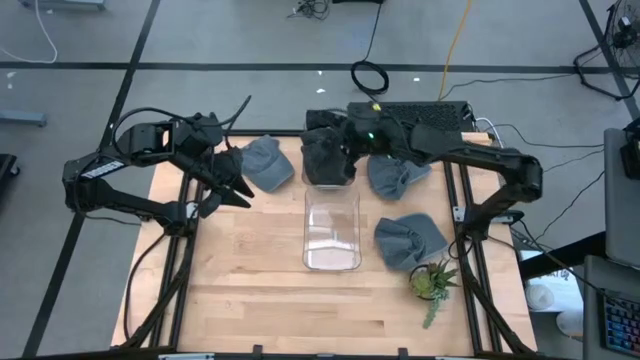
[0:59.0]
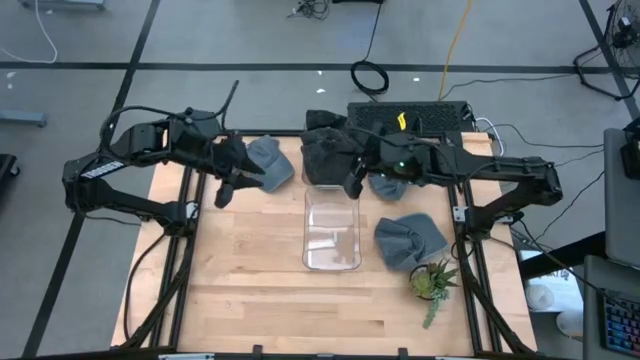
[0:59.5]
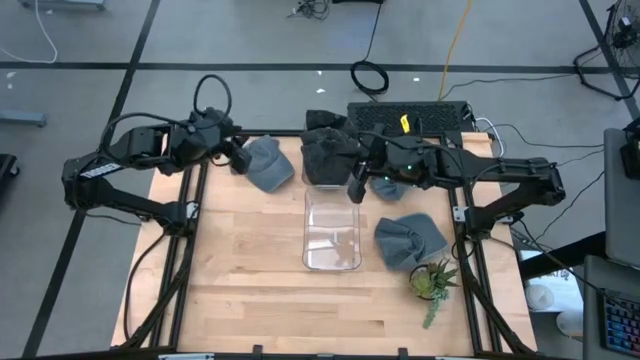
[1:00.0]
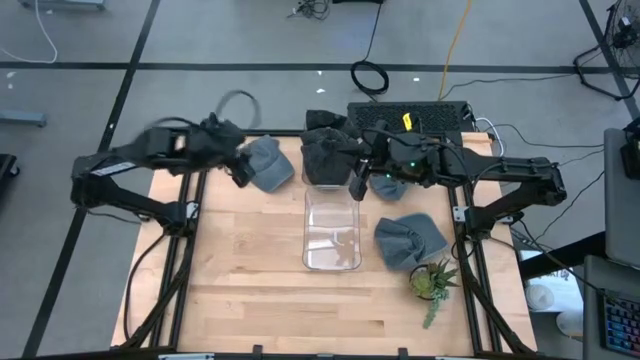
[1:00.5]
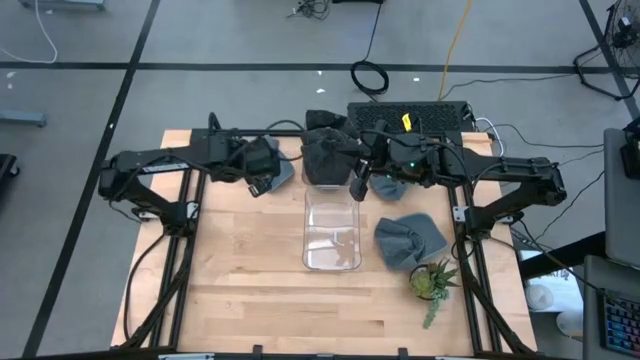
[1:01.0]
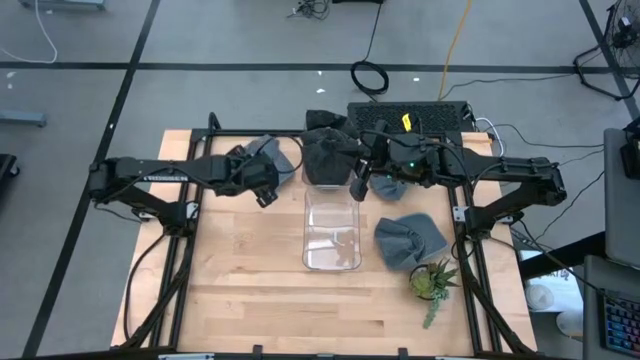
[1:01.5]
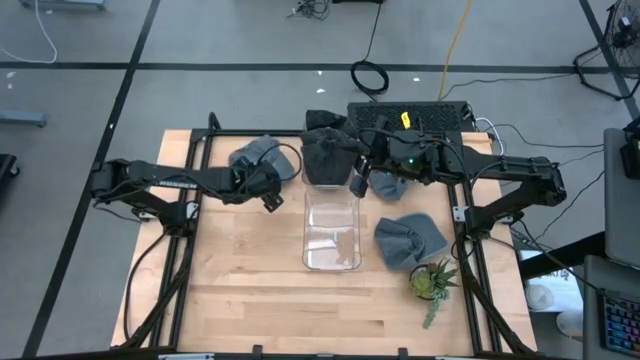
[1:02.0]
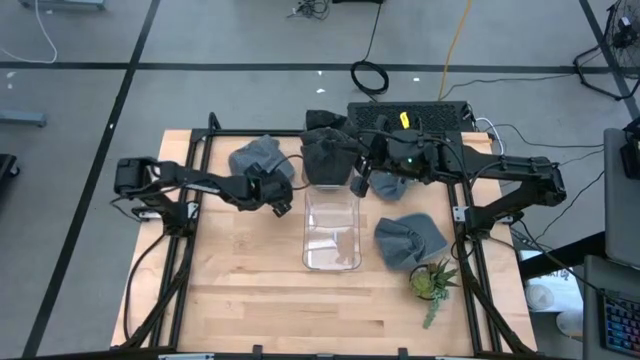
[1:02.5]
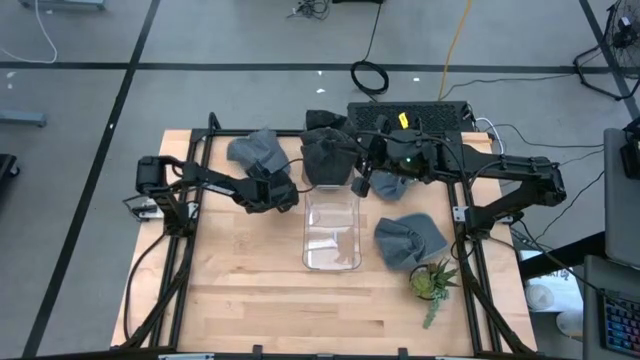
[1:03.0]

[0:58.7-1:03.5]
Task: Pick & Place hat
Put the top left blue cap into the bottom transparent bin

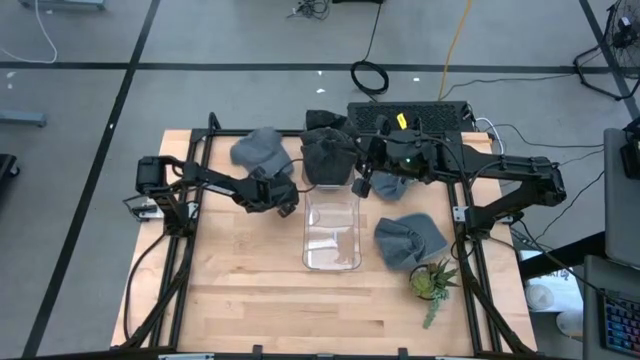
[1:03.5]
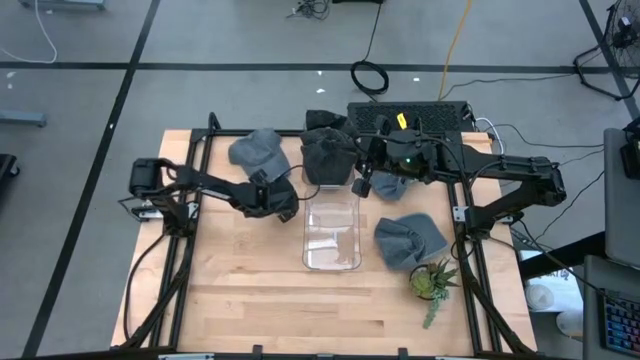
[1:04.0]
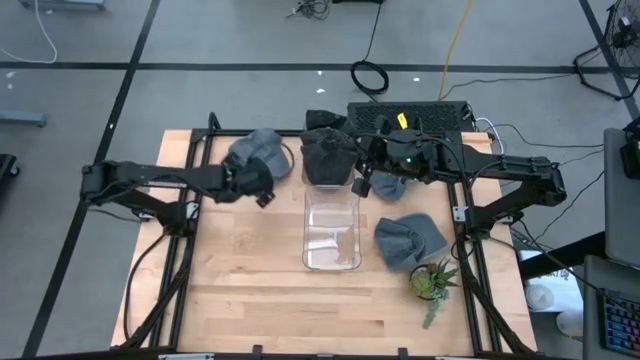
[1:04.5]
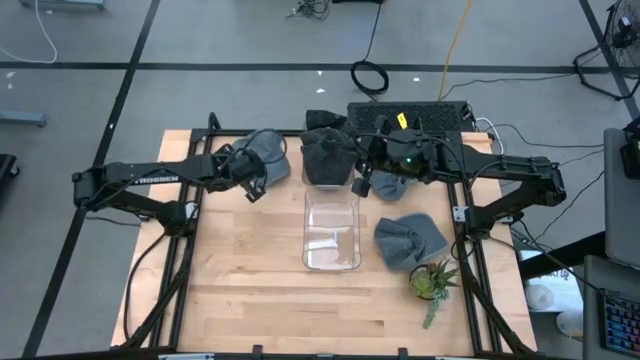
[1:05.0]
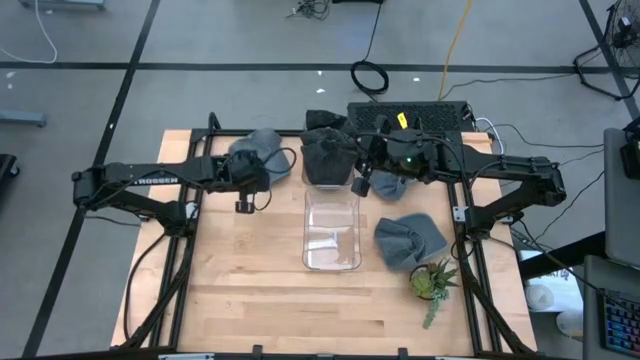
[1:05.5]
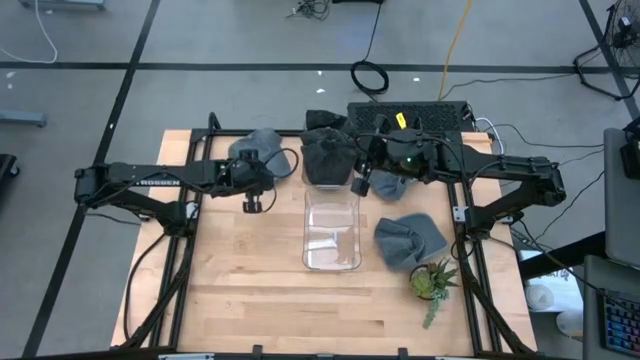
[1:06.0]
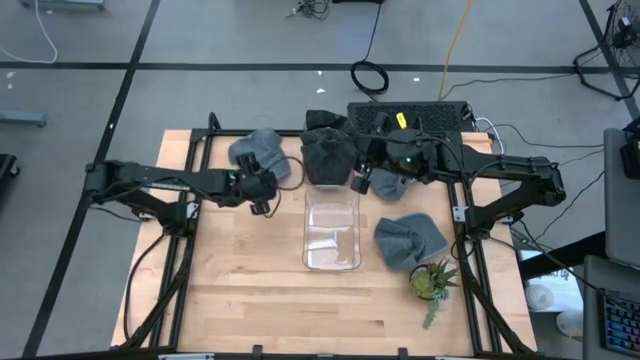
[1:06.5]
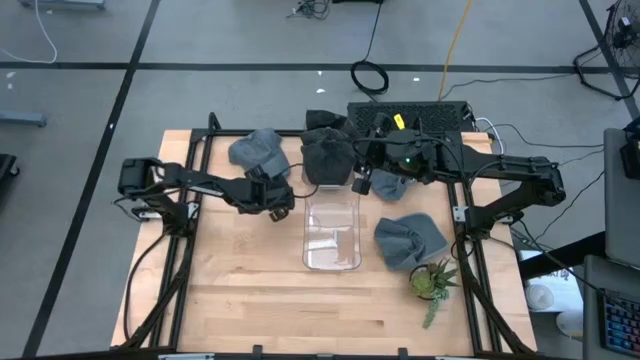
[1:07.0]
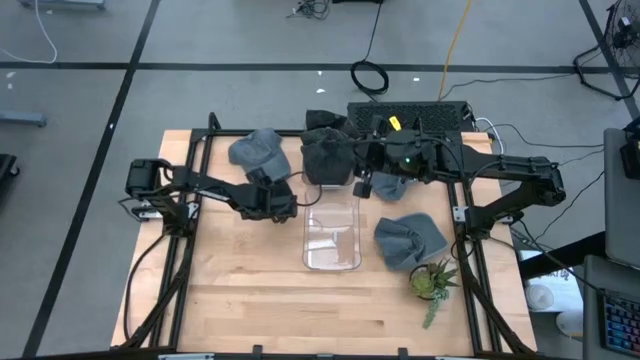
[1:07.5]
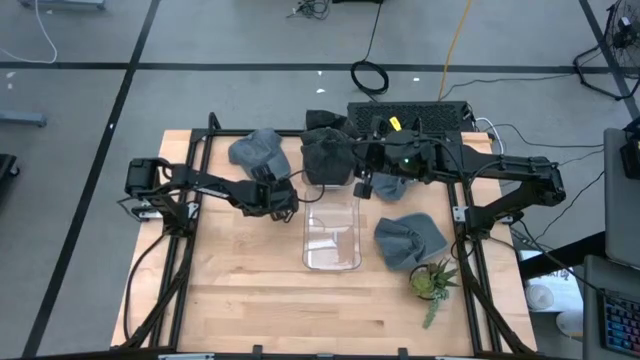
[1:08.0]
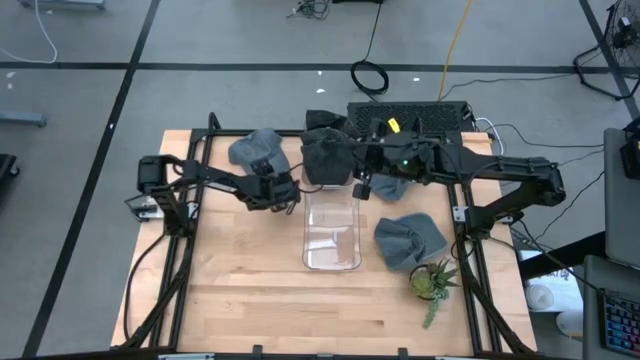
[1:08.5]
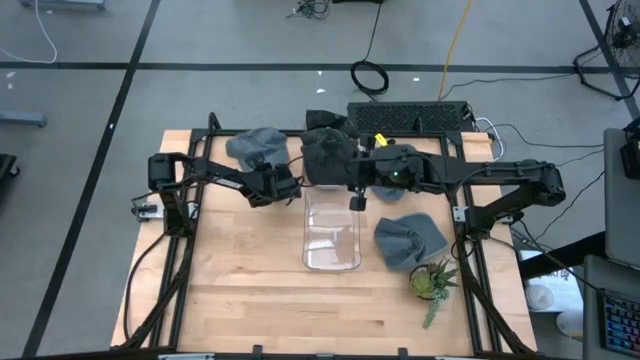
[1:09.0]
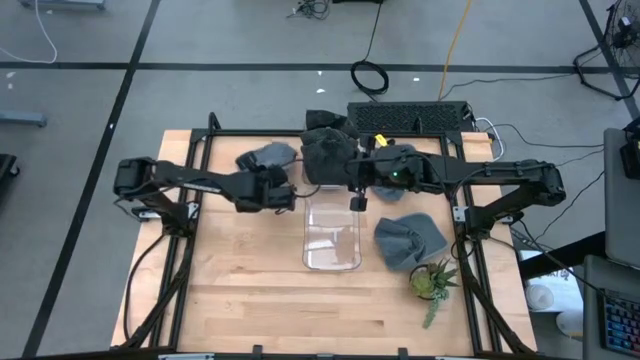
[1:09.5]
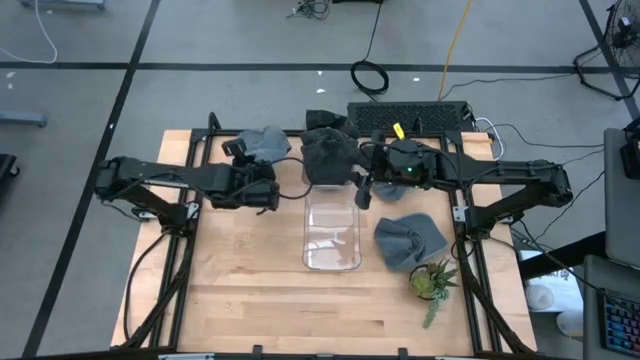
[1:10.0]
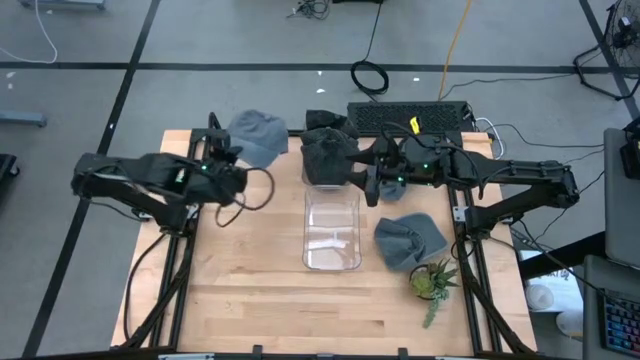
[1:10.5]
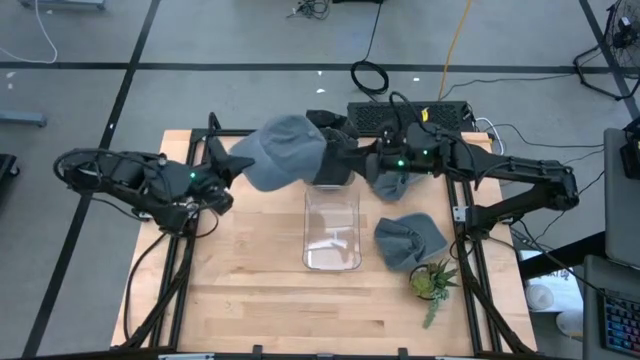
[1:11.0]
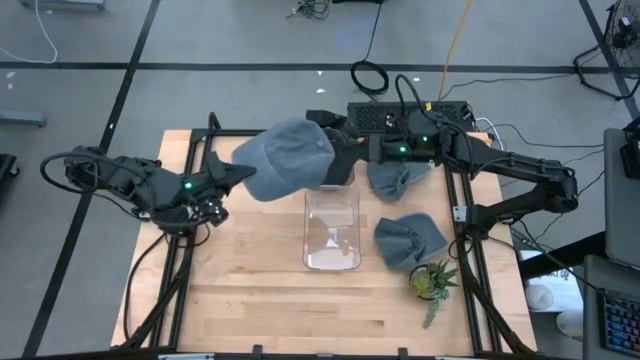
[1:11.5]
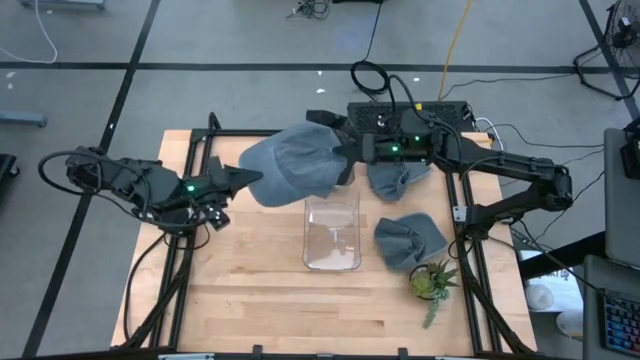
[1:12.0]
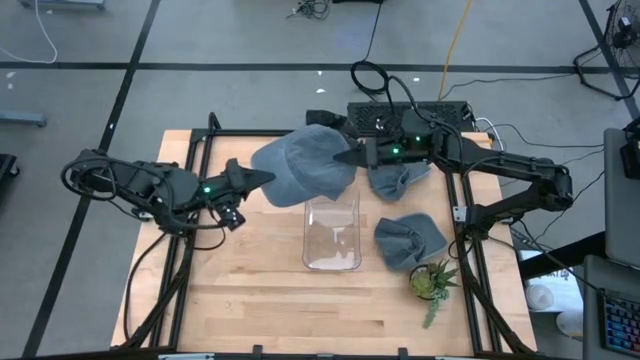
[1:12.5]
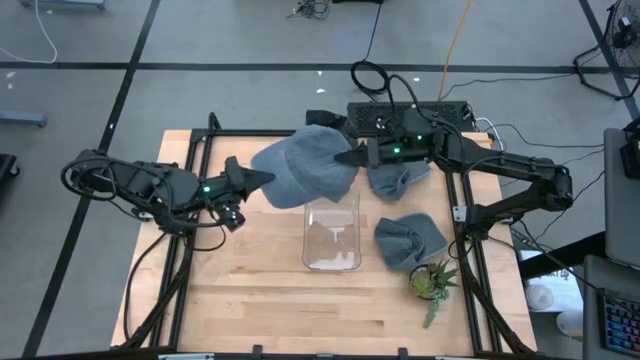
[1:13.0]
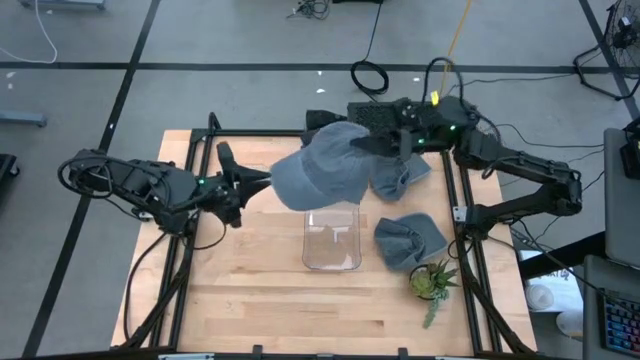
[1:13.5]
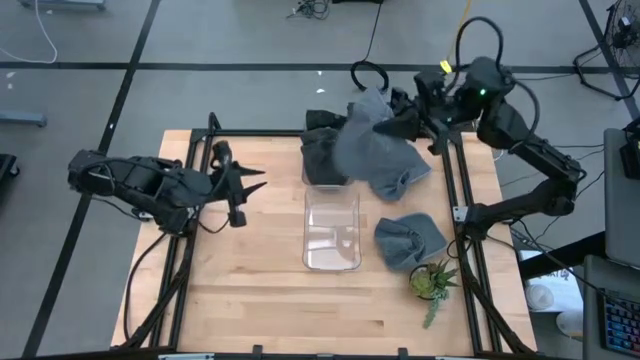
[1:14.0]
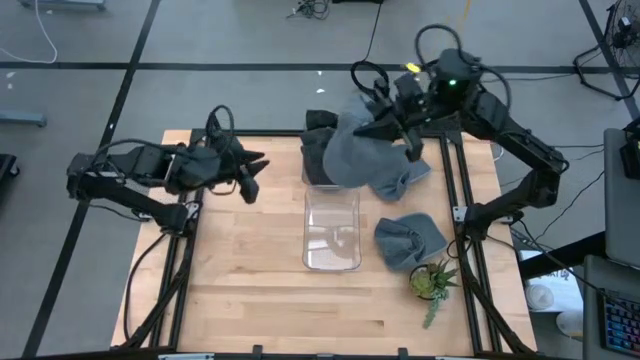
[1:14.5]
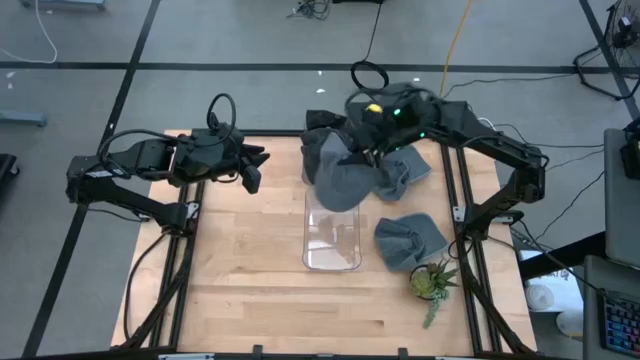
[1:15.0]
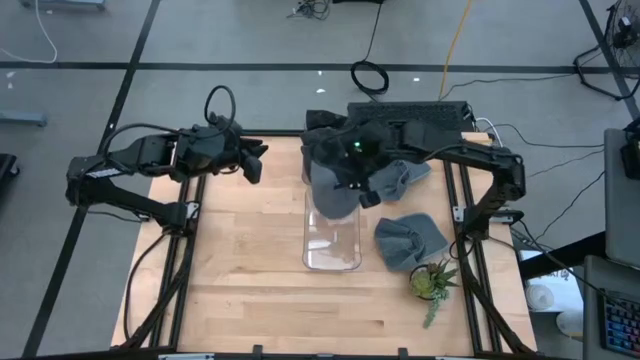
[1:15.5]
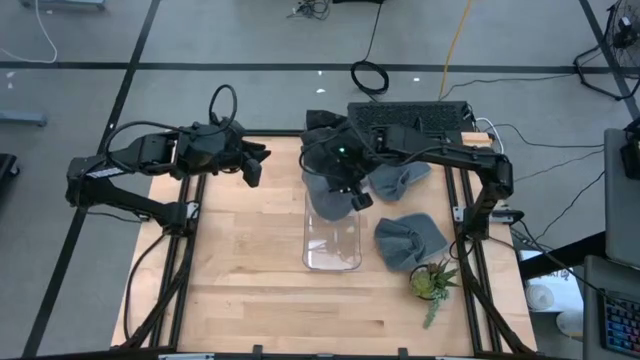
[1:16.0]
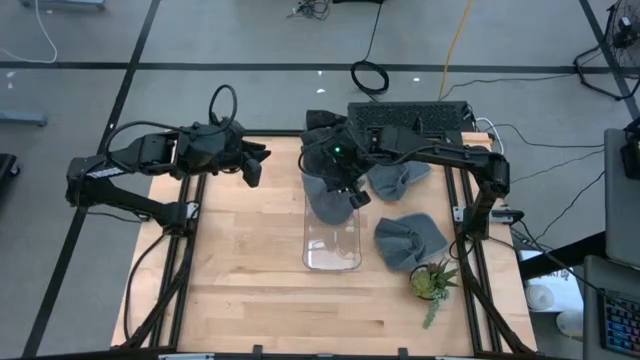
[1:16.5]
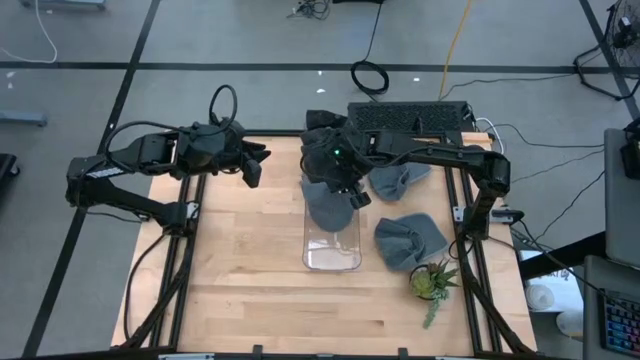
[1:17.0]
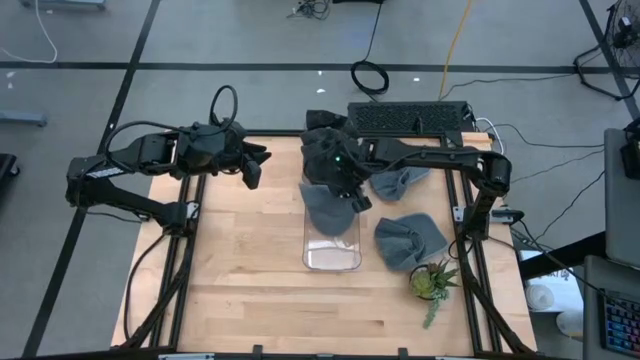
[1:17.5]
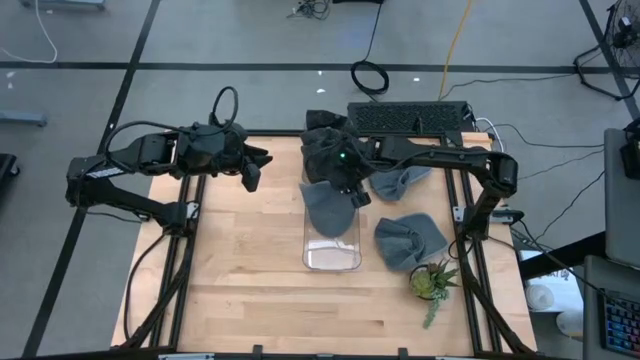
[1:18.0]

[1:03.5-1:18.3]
Put the top left blue cap into the bottom transparent bin
